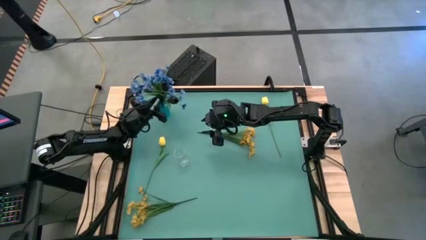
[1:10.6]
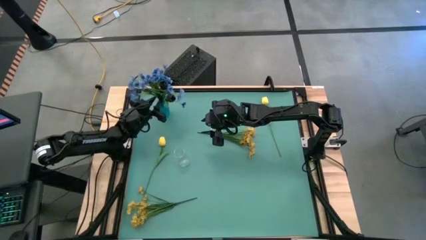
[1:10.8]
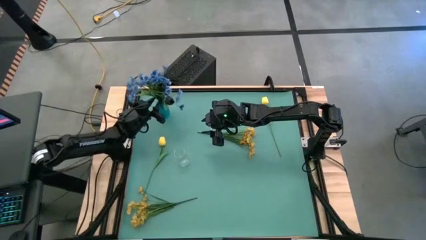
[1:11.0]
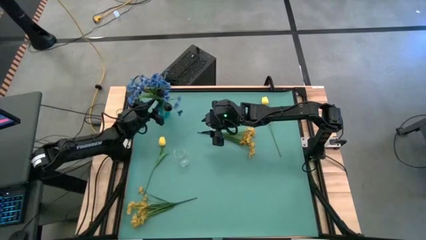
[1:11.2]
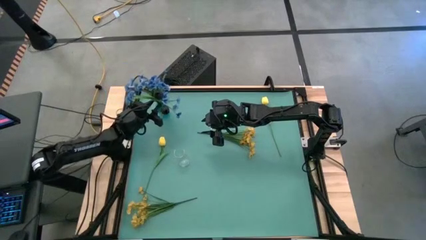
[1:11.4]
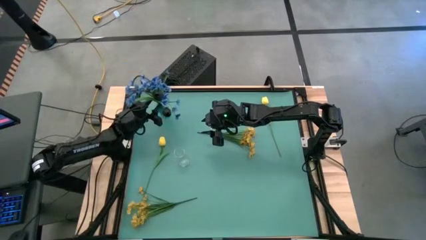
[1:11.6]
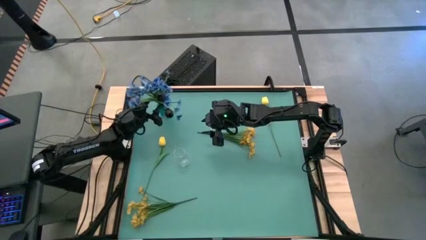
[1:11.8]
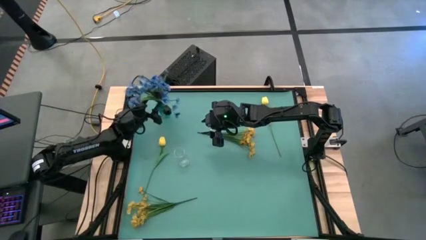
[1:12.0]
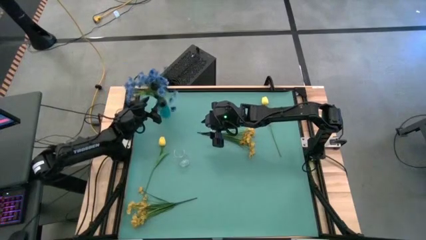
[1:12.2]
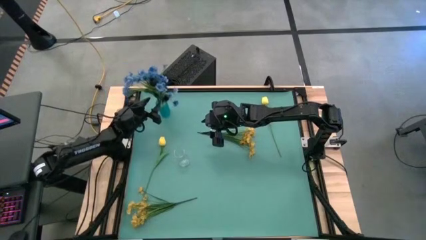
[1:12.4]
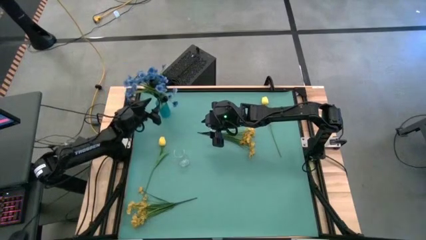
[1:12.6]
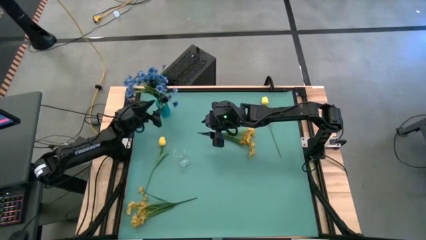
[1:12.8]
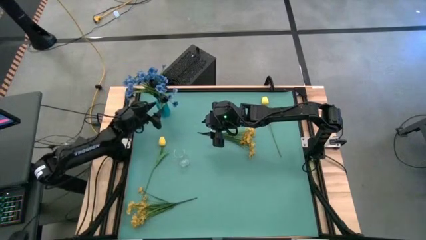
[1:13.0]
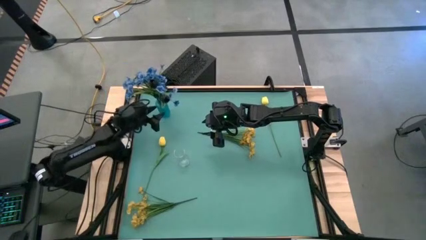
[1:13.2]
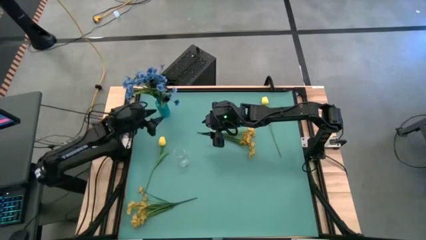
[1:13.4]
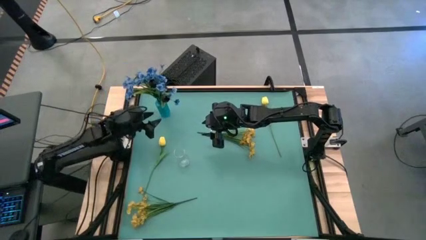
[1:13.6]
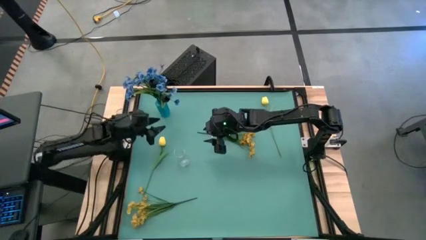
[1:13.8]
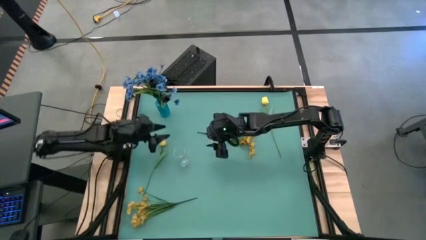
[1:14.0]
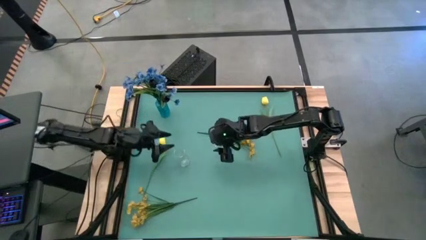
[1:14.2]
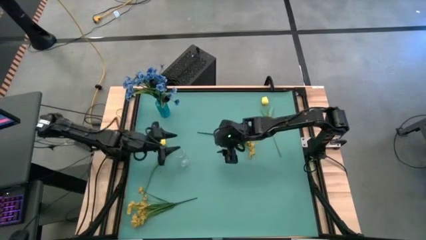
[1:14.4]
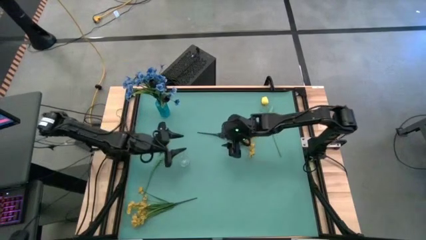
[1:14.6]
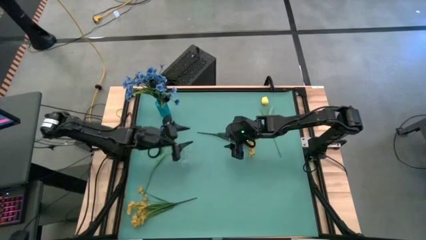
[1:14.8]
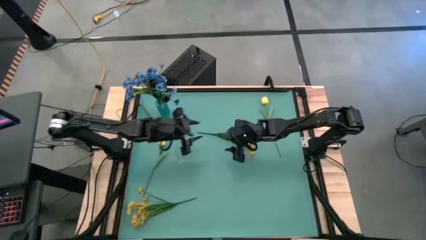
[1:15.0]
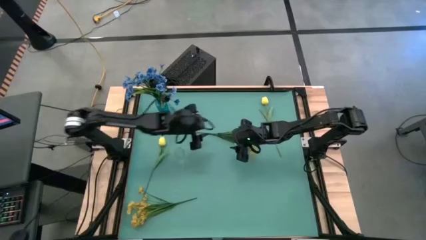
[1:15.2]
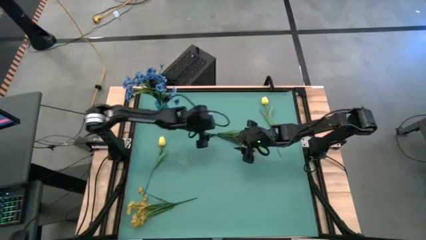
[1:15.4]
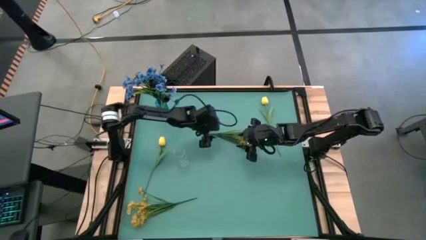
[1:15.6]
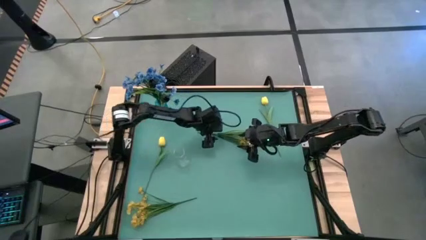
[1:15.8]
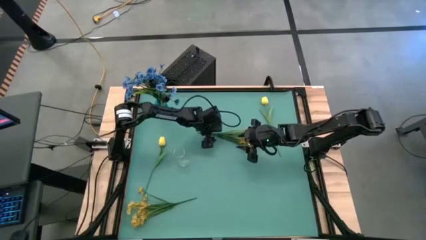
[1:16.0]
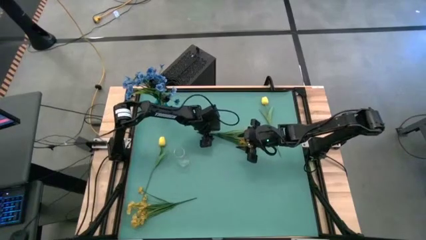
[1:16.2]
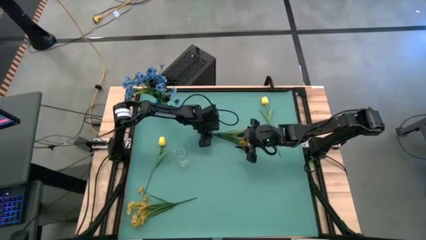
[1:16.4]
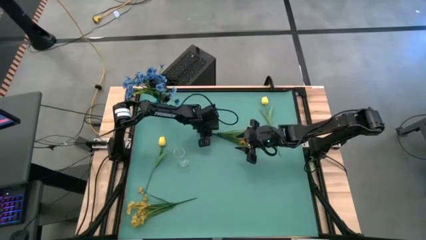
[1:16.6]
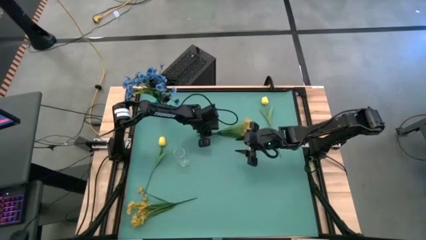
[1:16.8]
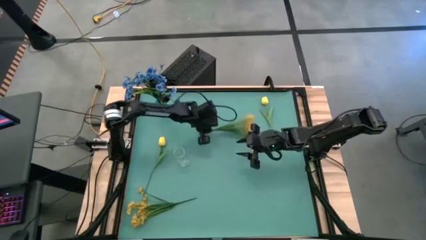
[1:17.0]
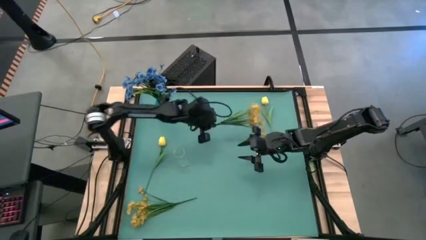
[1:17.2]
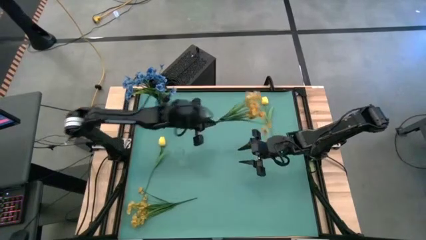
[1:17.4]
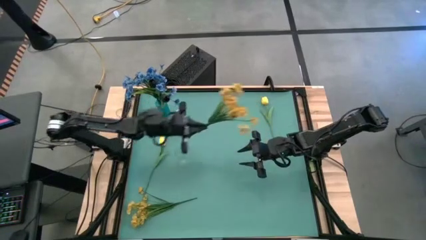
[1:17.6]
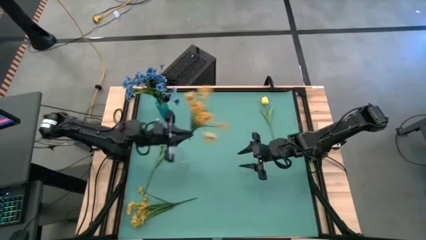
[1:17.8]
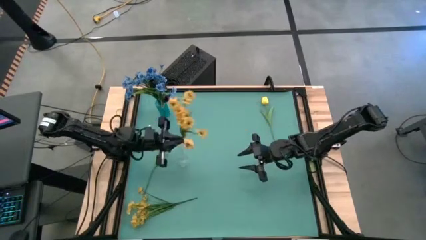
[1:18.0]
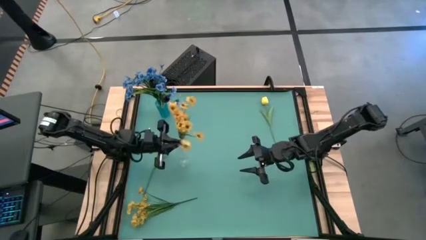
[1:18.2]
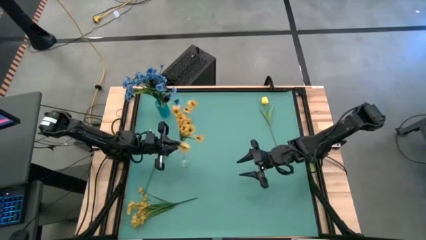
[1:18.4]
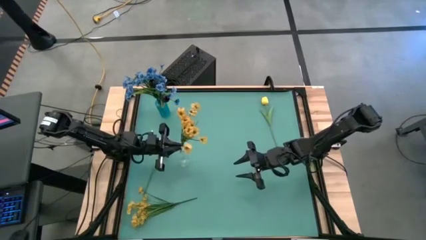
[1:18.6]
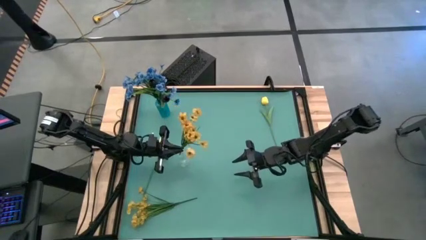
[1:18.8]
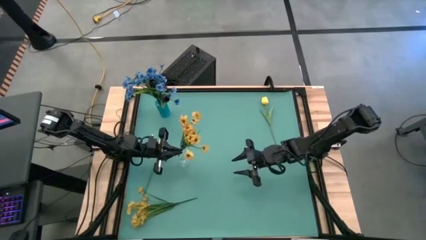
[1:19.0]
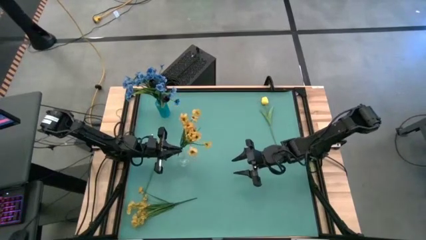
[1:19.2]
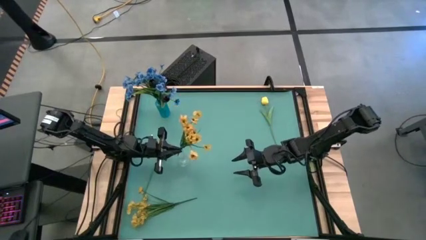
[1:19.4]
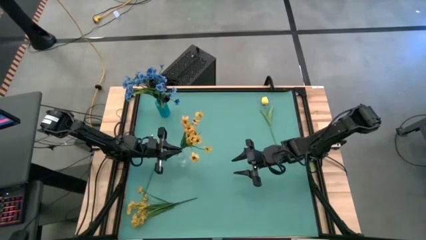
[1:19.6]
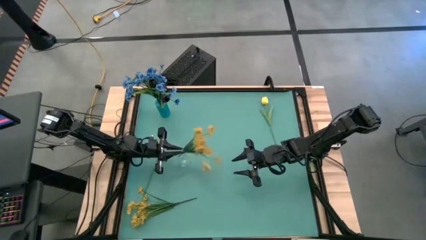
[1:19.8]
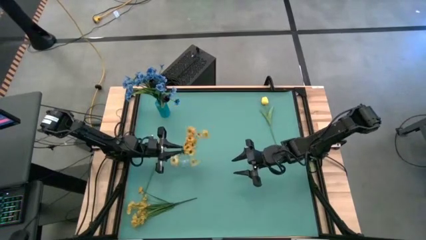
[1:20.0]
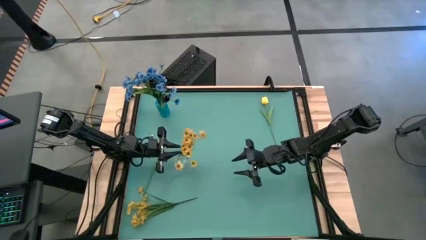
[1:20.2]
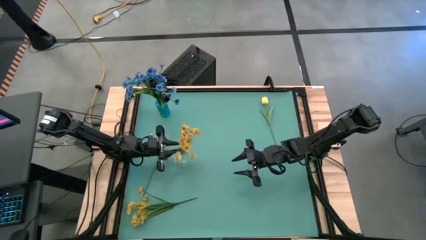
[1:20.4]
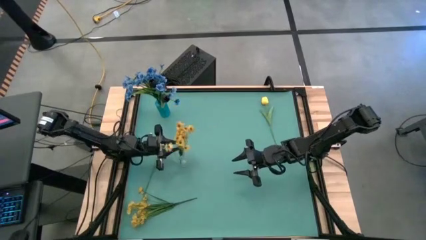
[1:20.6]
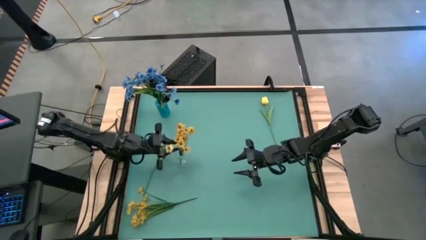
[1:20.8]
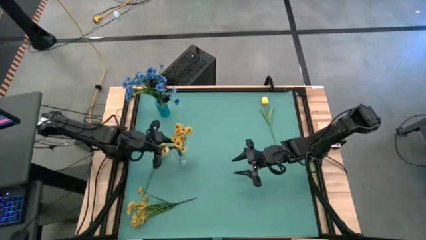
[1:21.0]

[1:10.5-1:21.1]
Task: Sort flowers into vase by color
Put the top yellow flowers into the transparent vase
